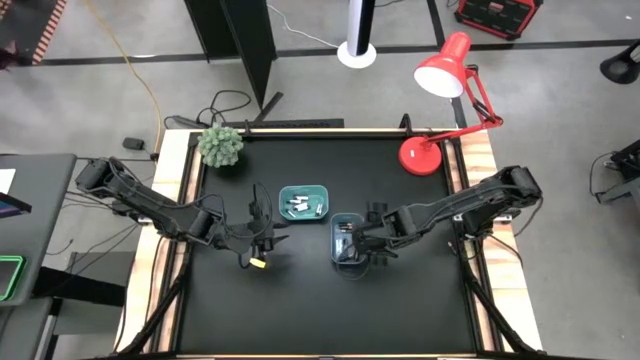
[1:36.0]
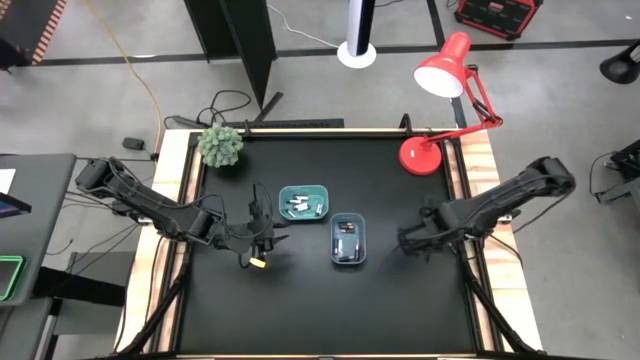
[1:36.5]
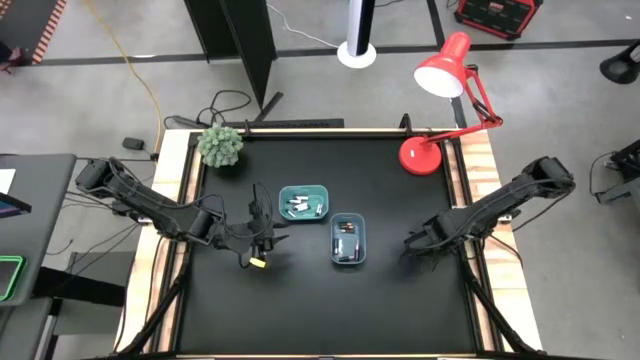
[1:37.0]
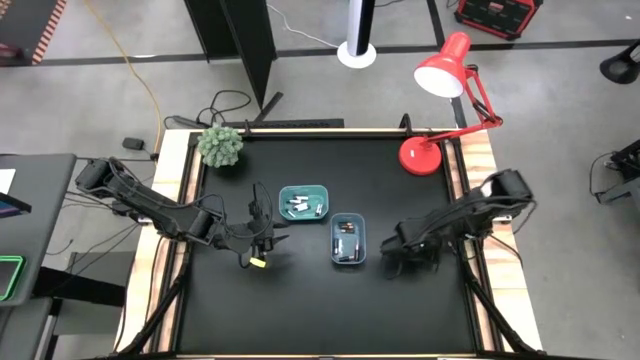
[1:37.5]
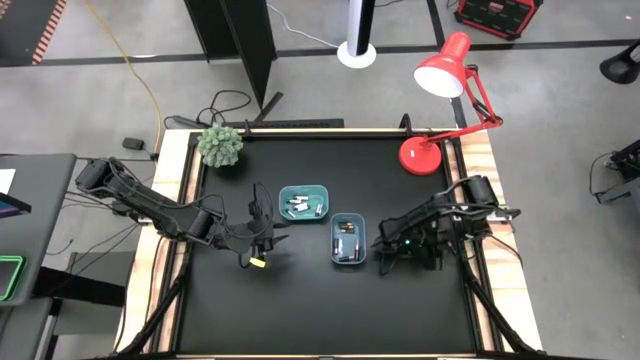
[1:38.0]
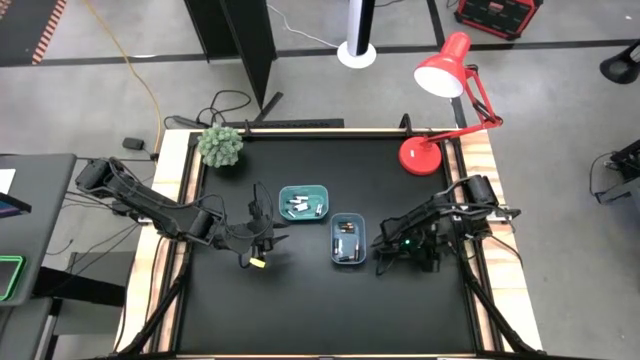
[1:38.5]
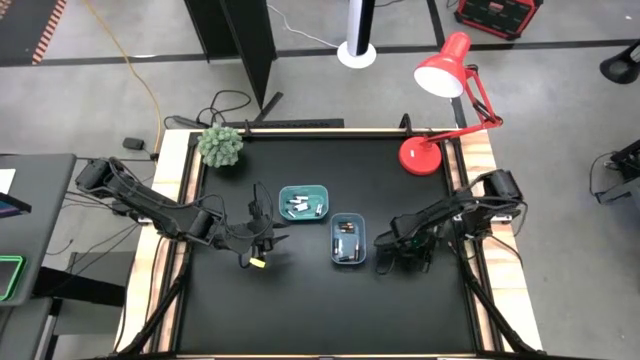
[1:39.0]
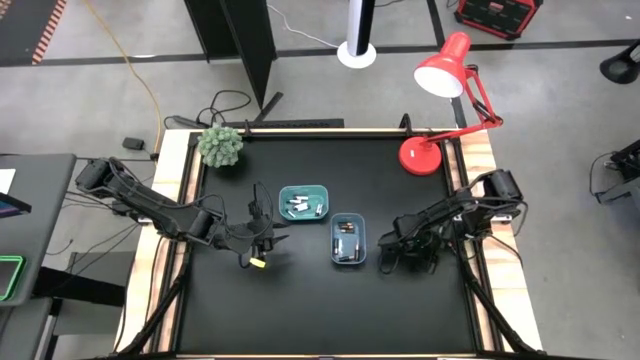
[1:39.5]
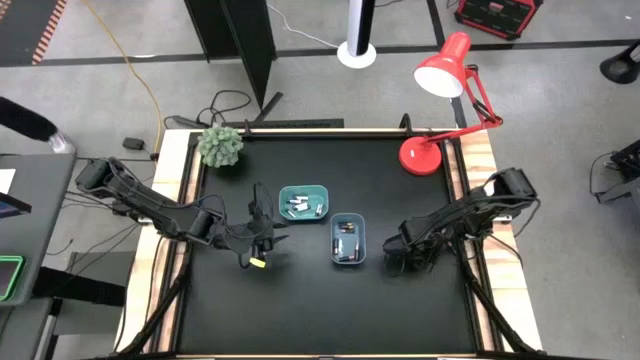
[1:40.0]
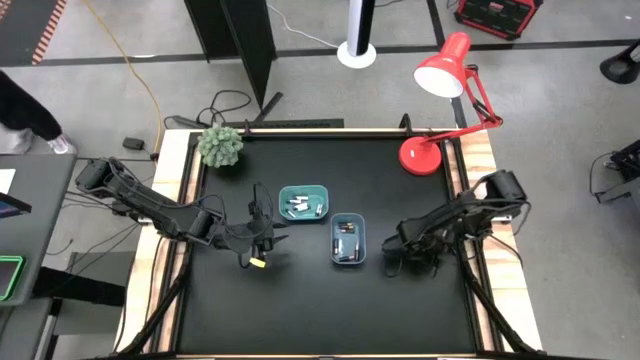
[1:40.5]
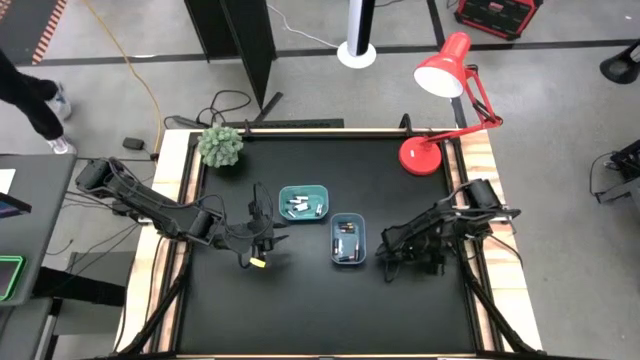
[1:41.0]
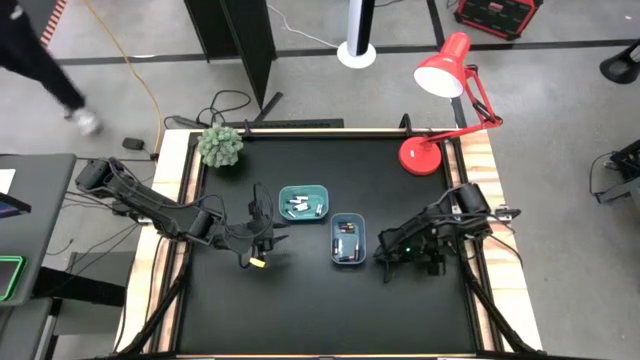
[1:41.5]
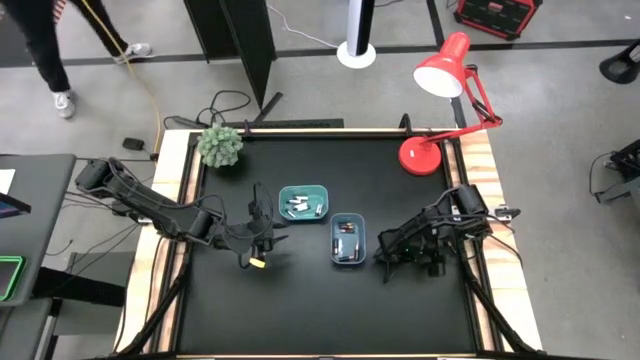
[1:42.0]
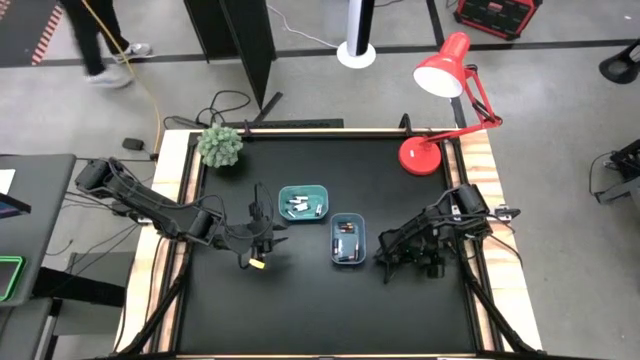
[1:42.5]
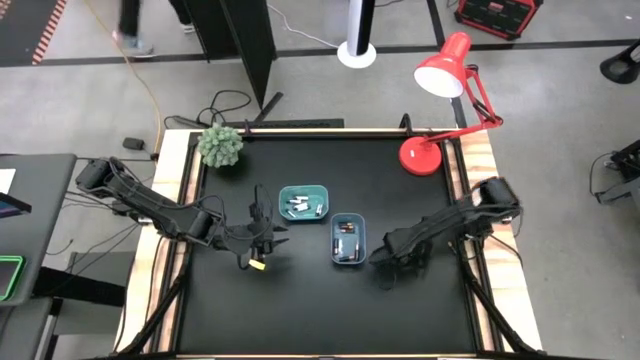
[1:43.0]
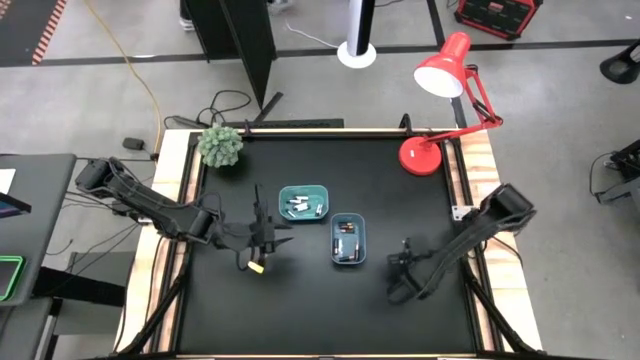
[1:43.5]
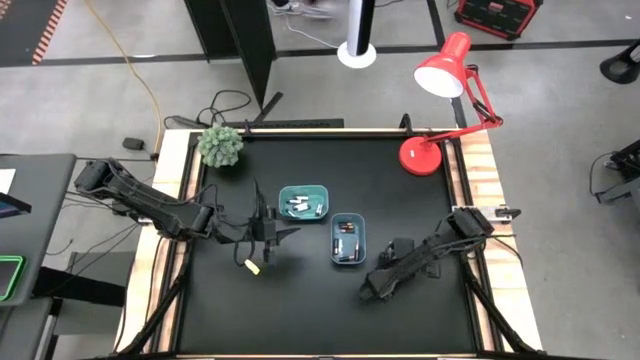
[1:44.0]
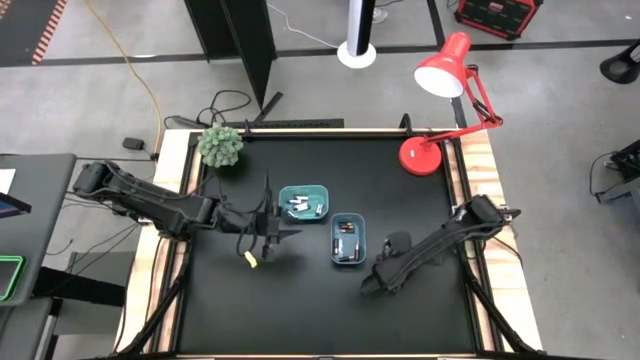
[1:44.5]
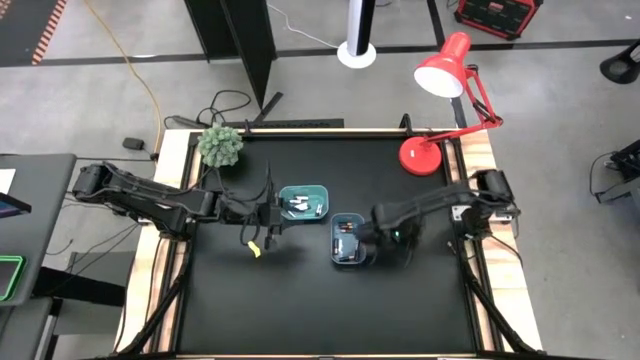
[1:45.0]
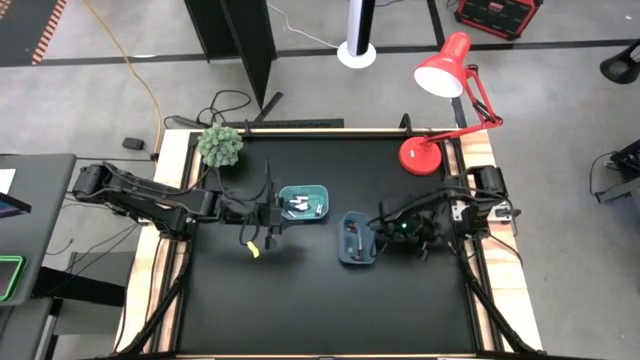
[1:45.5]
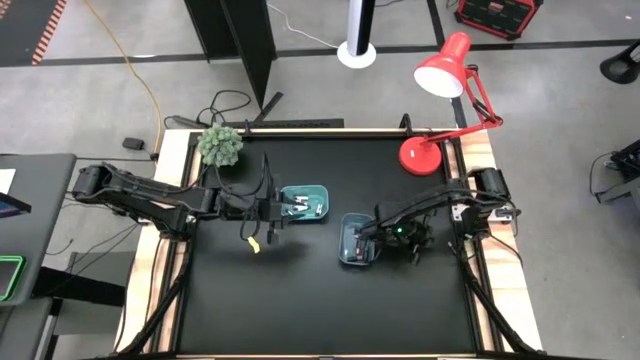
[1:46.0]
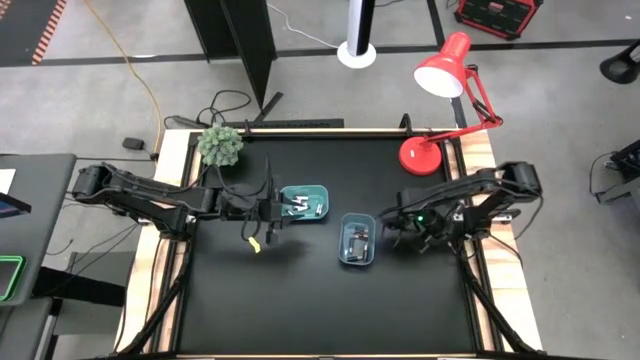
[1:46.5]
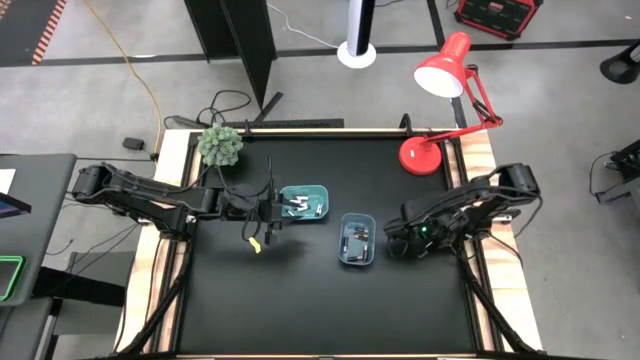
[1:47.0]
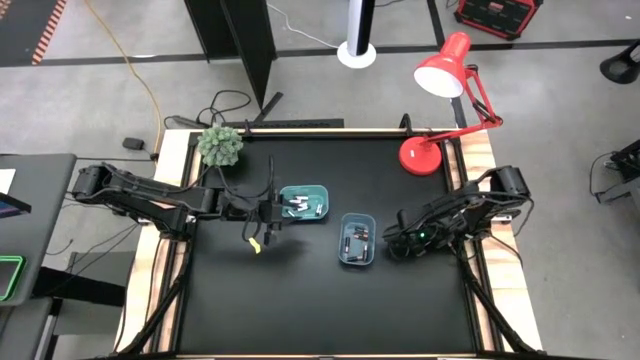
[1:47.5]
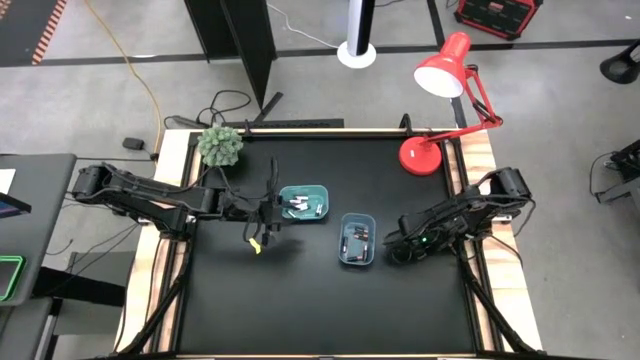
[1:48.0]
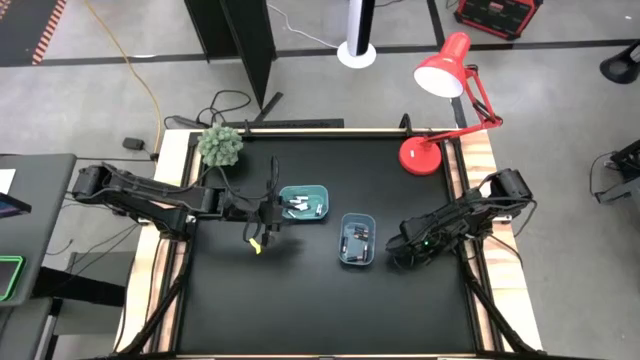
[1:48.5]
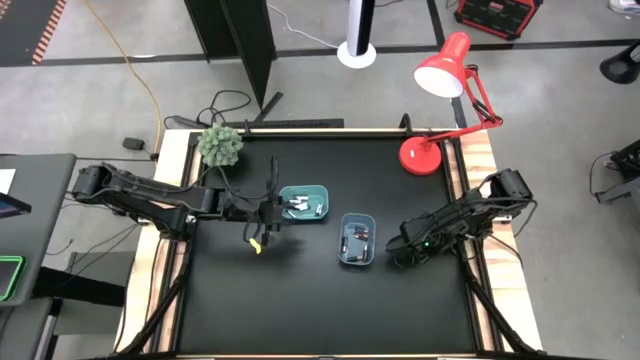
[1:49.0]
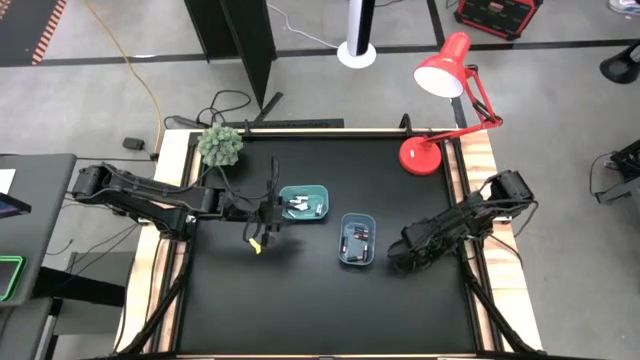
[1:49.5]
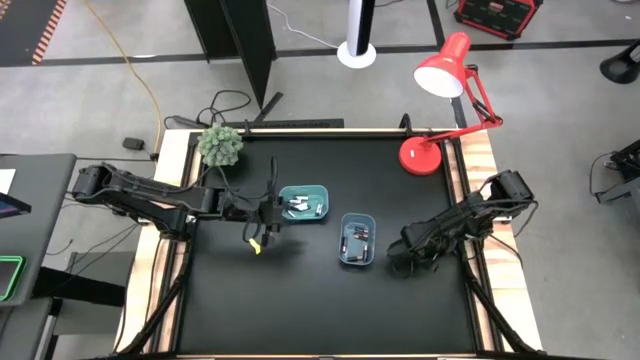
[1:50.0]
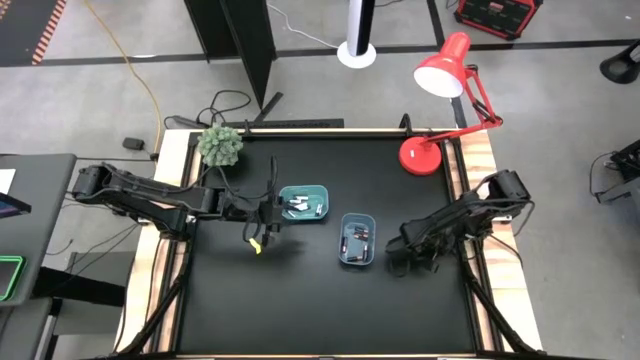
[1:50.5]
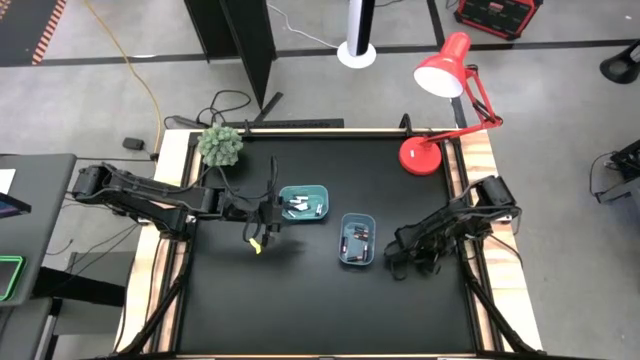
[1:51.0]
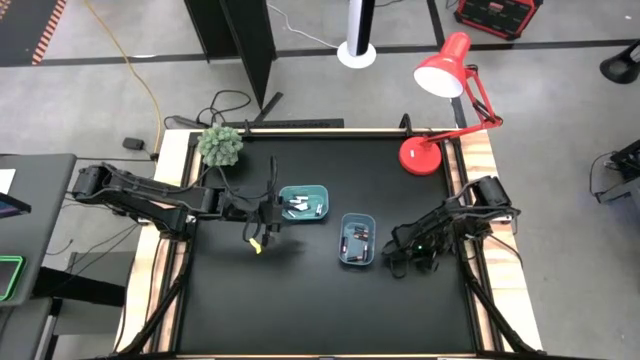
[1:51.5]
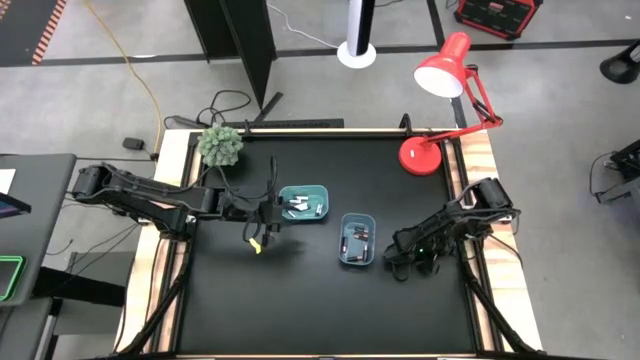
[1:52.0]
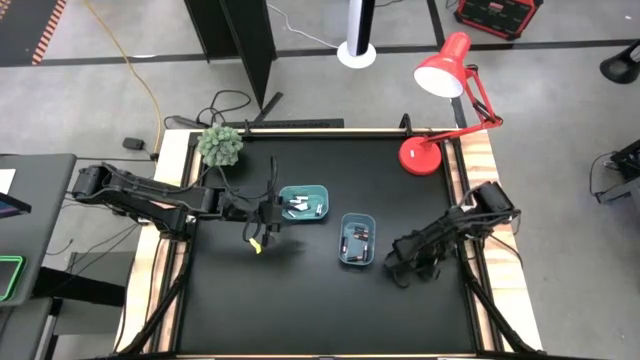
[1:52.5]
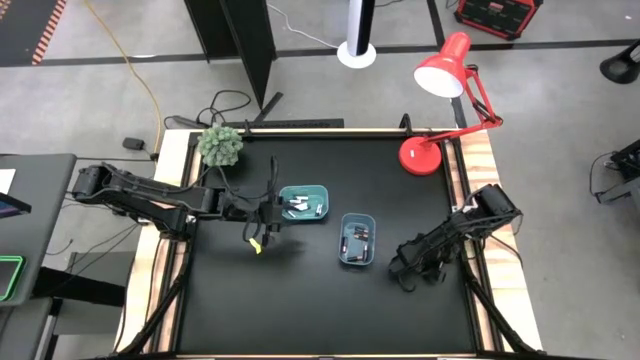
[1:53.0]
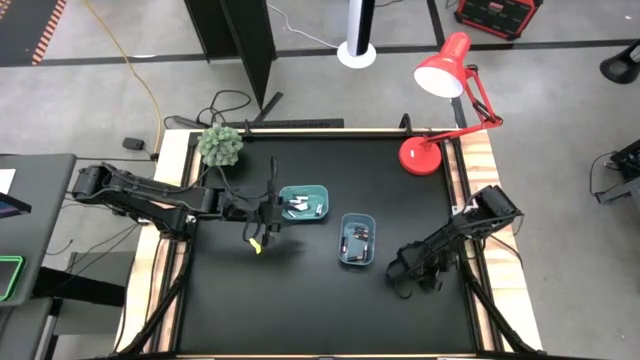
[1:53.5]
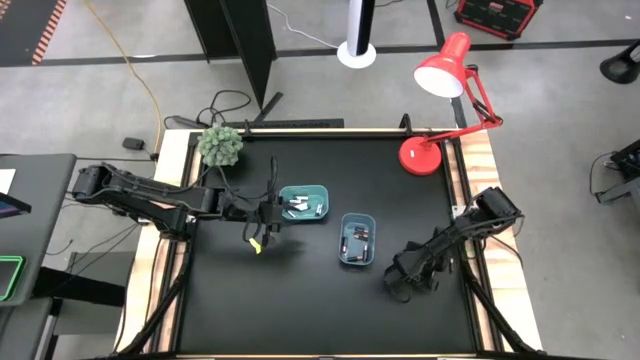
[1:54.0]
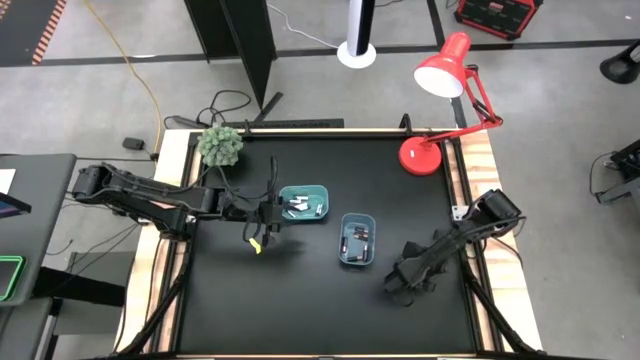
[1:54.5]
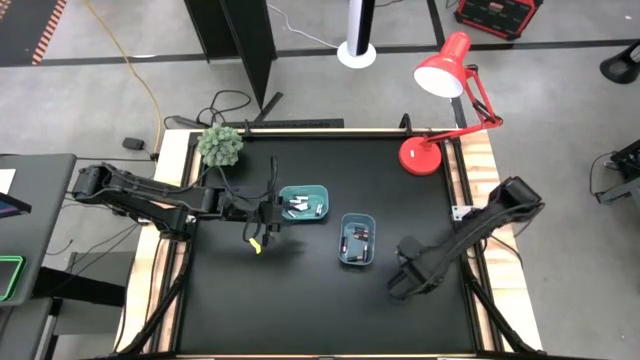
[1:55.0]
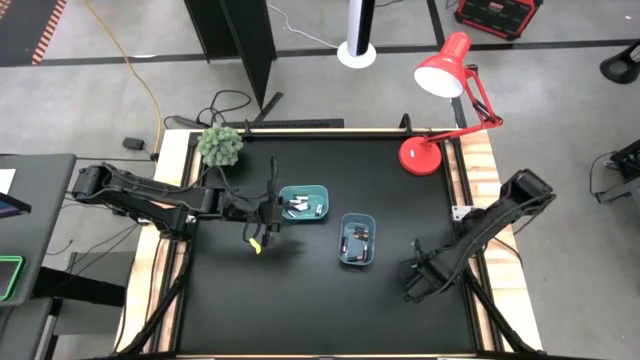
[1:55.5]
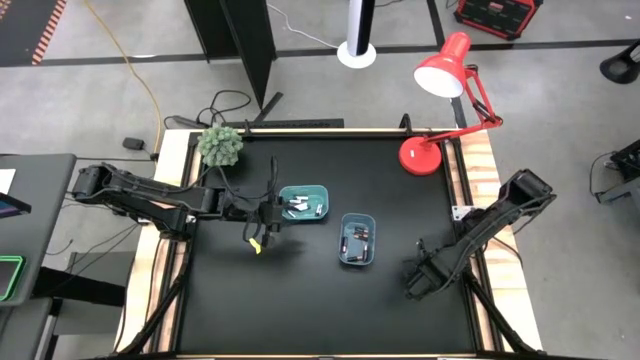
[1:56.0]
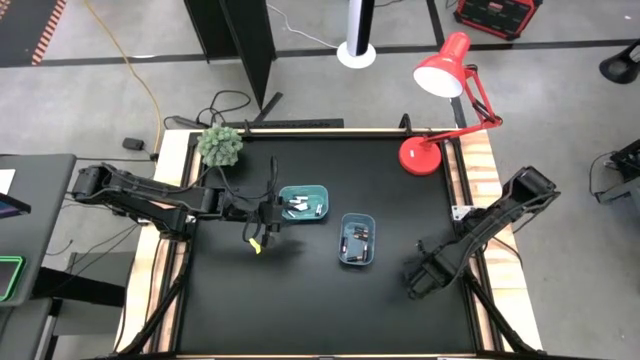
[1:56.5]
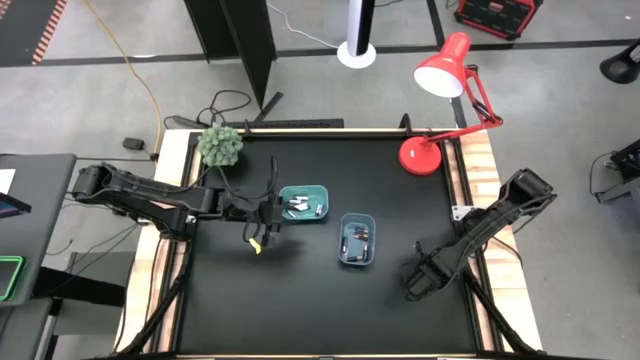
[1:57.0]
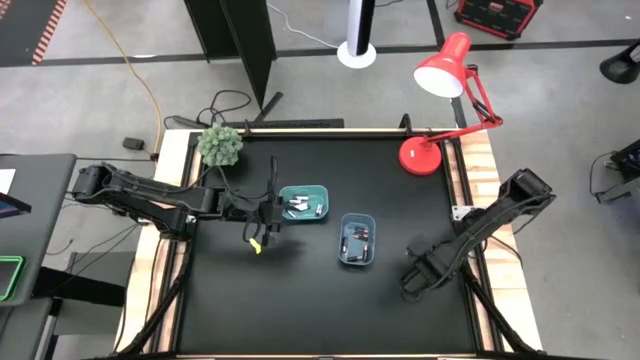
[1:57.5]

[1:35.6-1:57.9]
Task: Sort batteries
Put the black battery into the blue bin
